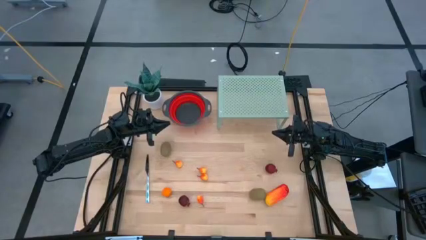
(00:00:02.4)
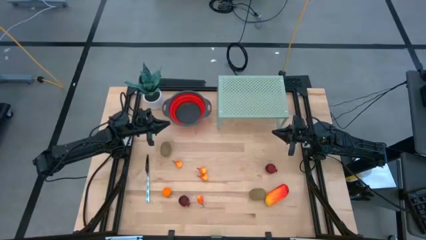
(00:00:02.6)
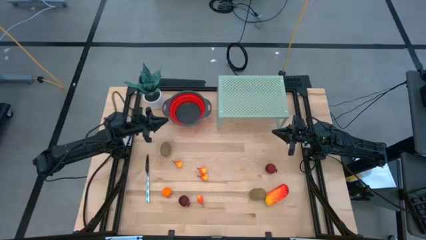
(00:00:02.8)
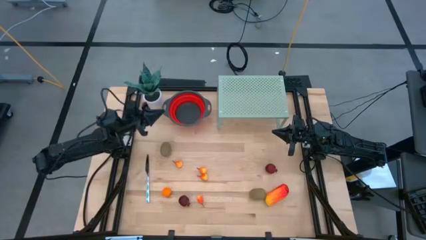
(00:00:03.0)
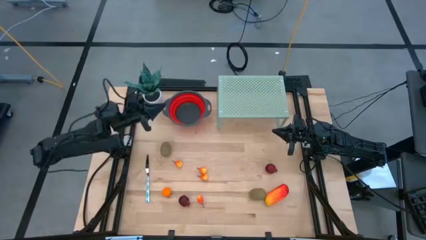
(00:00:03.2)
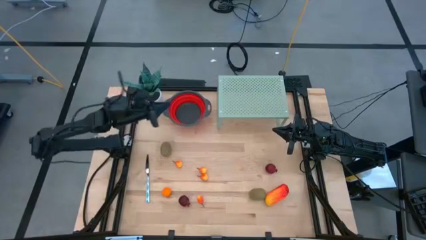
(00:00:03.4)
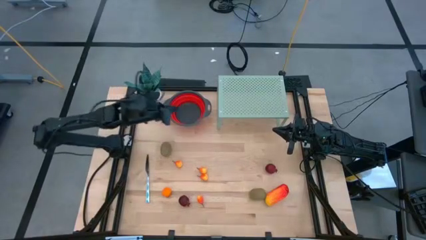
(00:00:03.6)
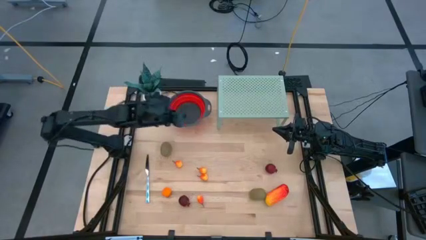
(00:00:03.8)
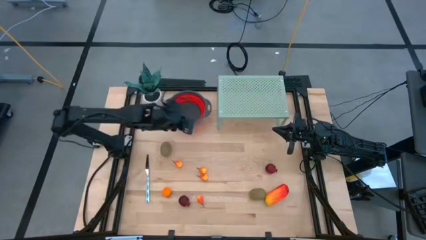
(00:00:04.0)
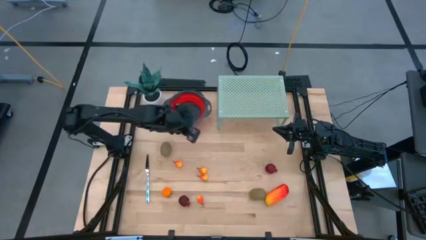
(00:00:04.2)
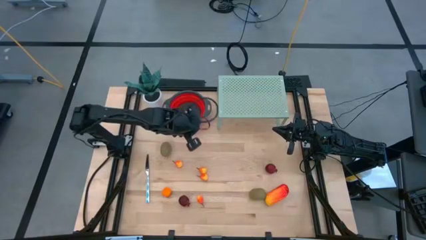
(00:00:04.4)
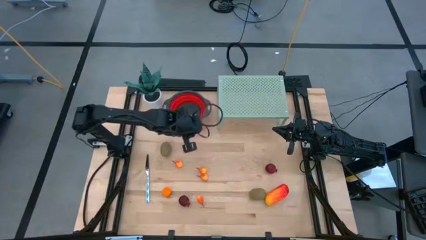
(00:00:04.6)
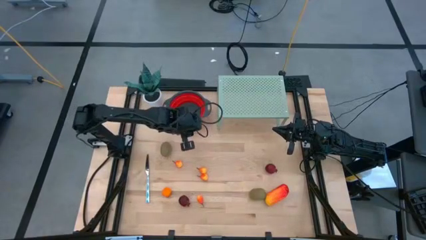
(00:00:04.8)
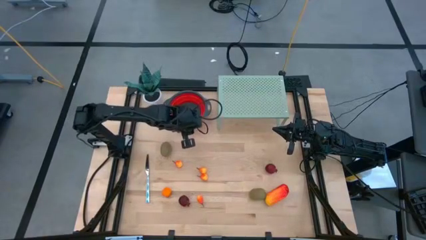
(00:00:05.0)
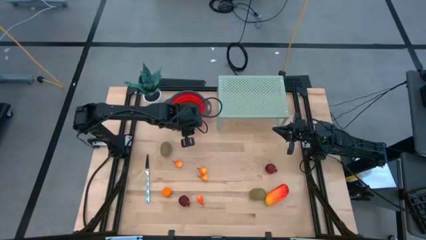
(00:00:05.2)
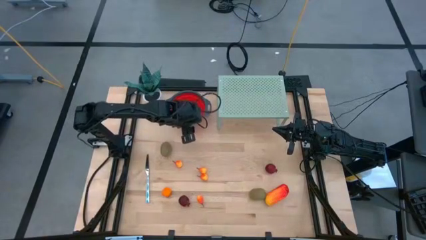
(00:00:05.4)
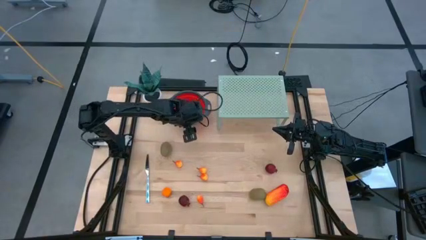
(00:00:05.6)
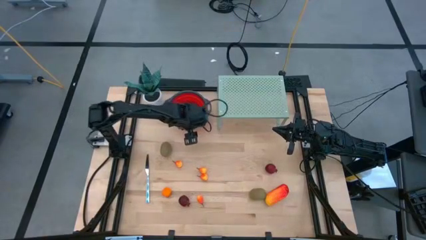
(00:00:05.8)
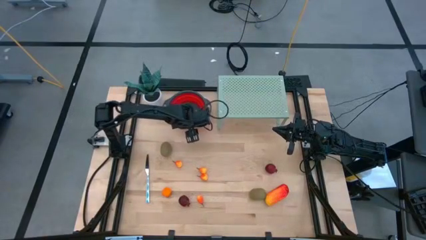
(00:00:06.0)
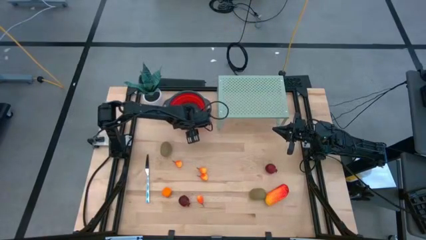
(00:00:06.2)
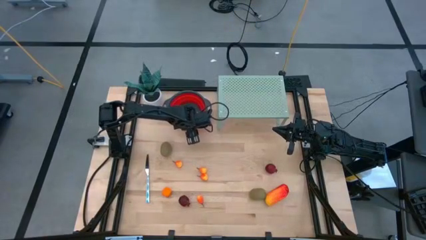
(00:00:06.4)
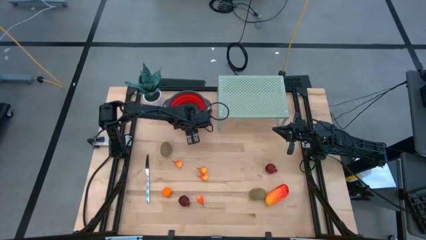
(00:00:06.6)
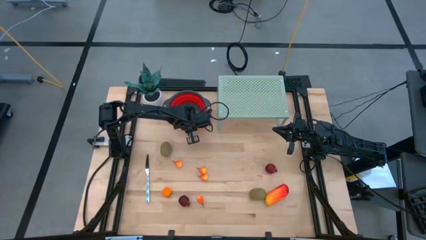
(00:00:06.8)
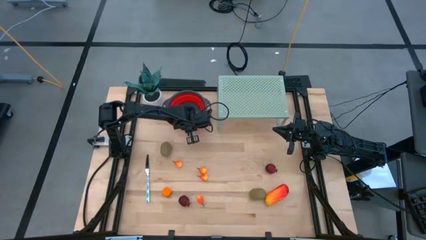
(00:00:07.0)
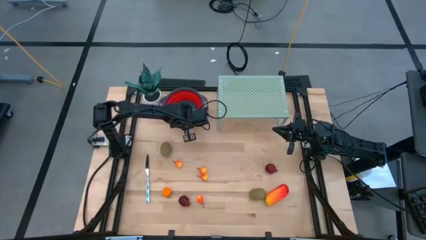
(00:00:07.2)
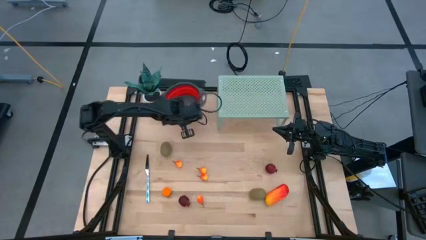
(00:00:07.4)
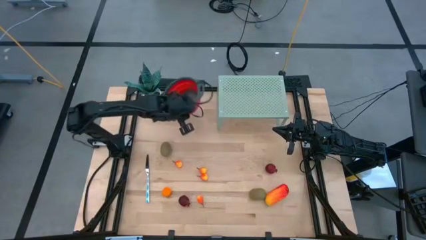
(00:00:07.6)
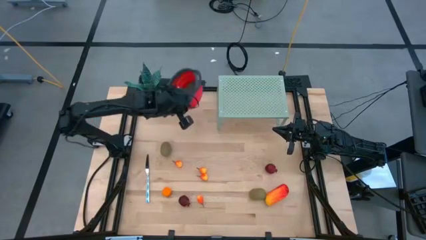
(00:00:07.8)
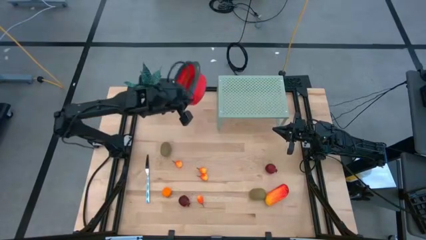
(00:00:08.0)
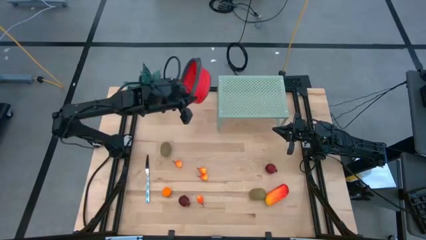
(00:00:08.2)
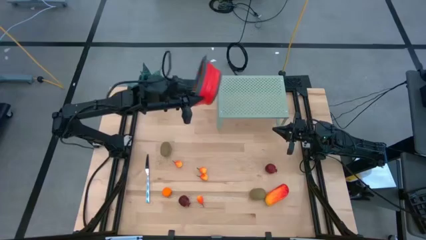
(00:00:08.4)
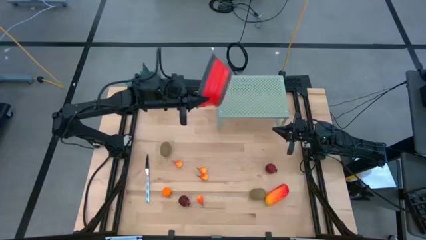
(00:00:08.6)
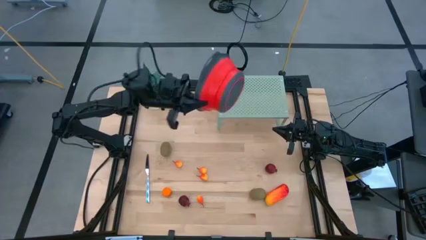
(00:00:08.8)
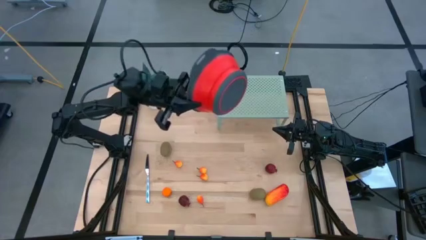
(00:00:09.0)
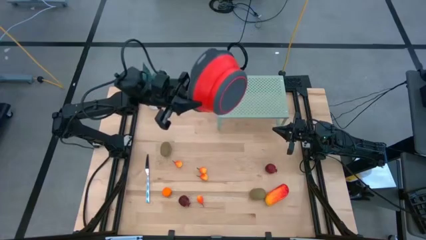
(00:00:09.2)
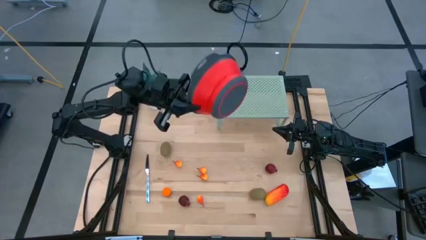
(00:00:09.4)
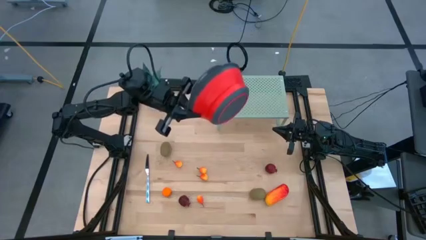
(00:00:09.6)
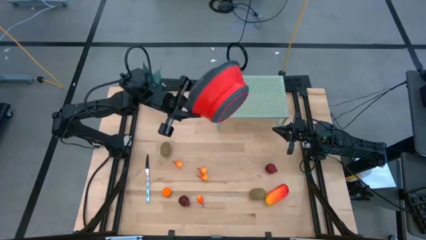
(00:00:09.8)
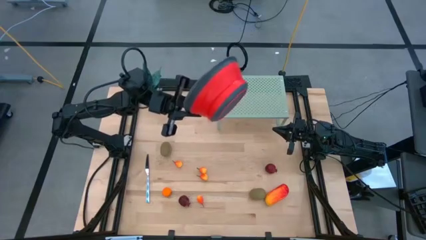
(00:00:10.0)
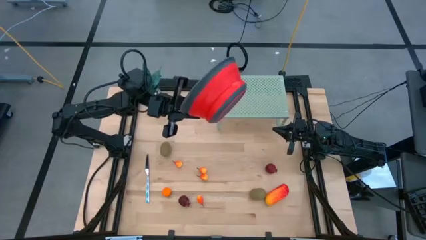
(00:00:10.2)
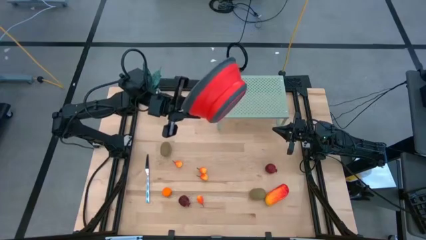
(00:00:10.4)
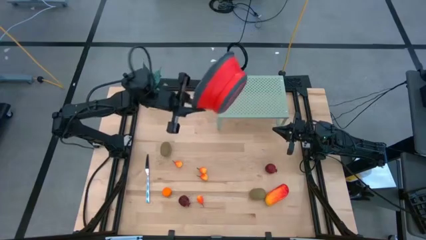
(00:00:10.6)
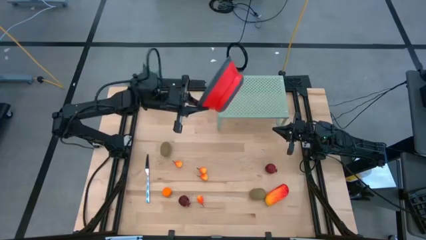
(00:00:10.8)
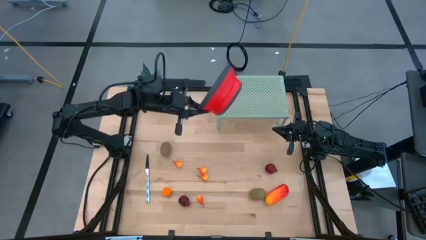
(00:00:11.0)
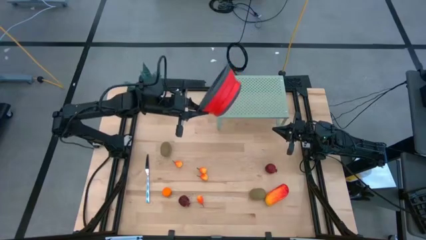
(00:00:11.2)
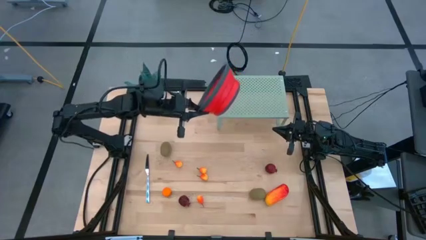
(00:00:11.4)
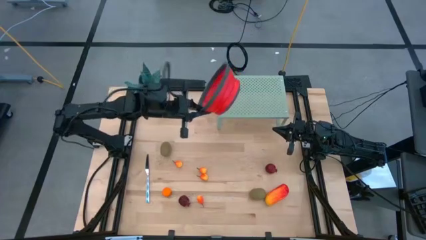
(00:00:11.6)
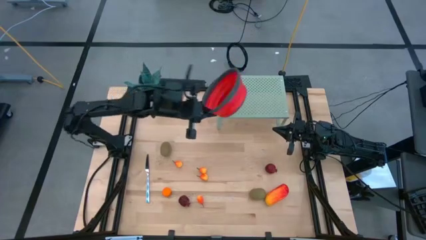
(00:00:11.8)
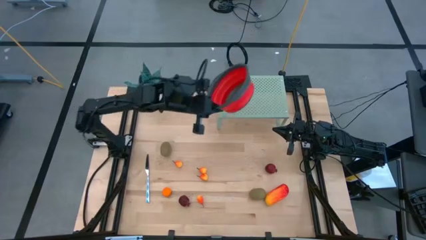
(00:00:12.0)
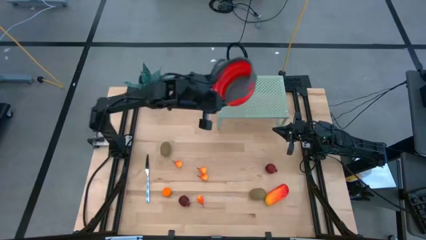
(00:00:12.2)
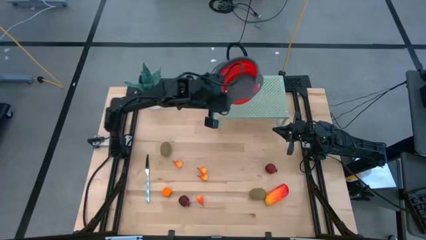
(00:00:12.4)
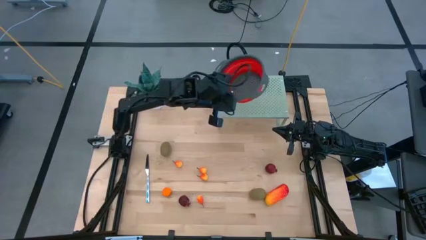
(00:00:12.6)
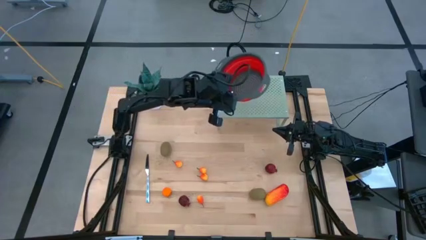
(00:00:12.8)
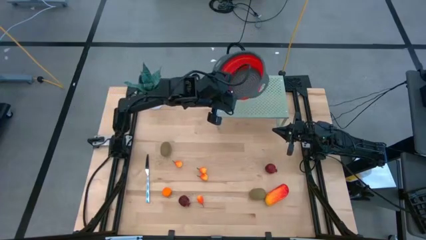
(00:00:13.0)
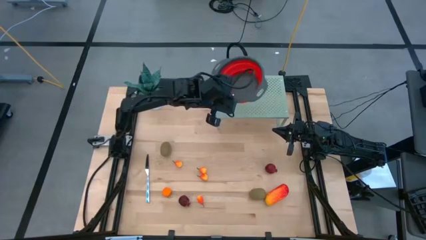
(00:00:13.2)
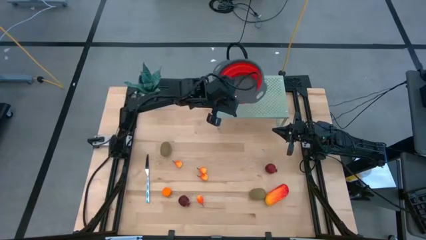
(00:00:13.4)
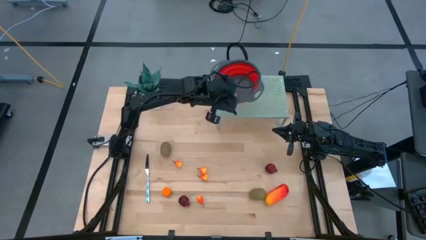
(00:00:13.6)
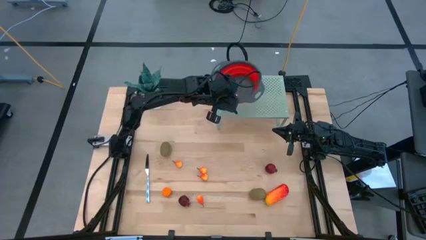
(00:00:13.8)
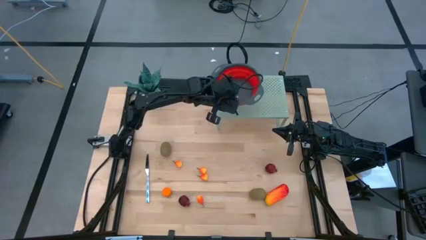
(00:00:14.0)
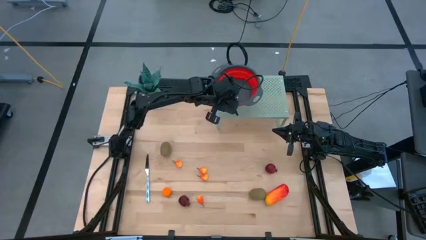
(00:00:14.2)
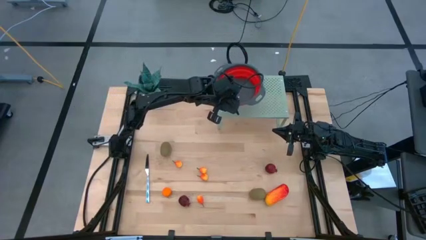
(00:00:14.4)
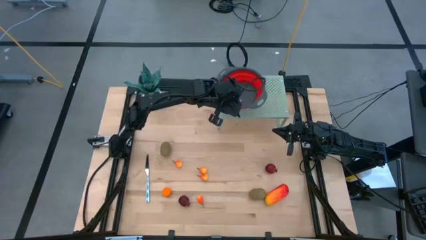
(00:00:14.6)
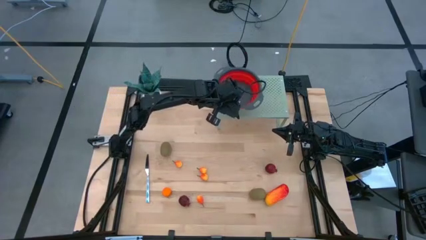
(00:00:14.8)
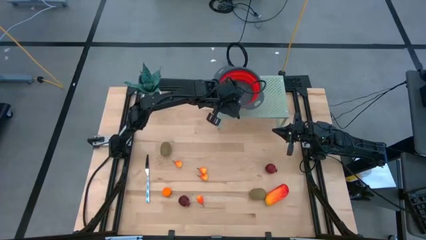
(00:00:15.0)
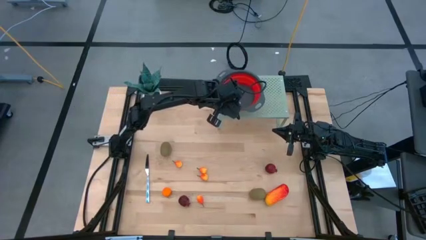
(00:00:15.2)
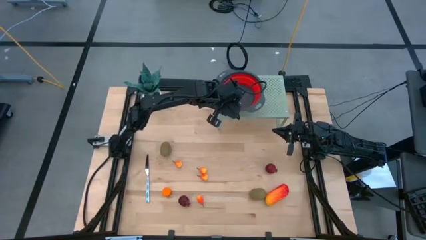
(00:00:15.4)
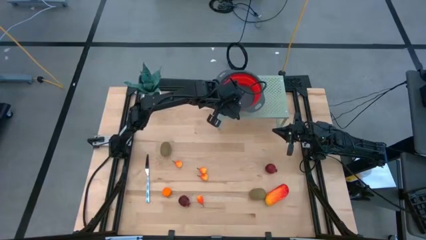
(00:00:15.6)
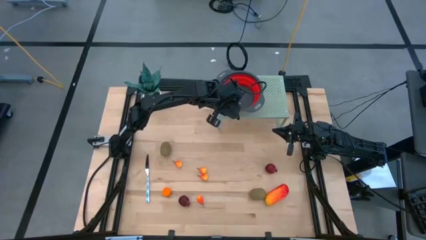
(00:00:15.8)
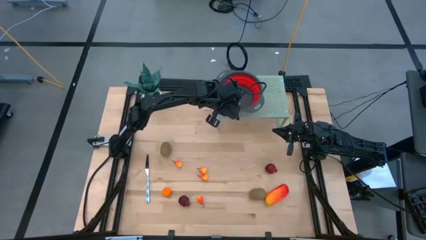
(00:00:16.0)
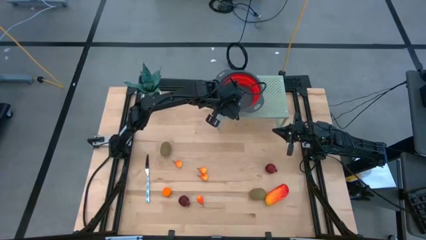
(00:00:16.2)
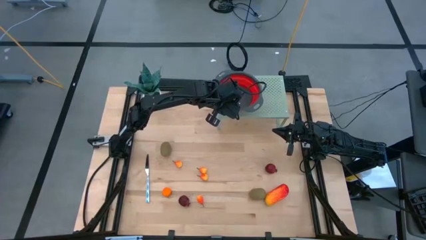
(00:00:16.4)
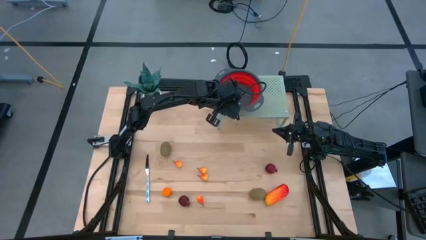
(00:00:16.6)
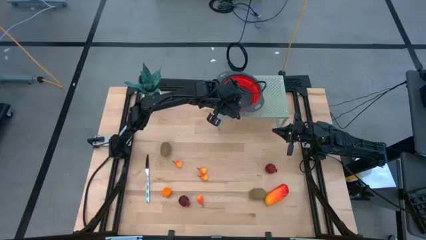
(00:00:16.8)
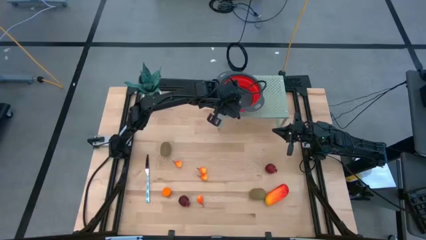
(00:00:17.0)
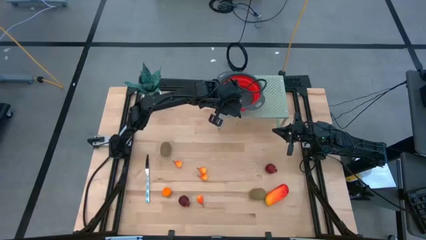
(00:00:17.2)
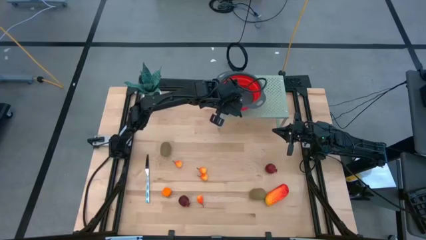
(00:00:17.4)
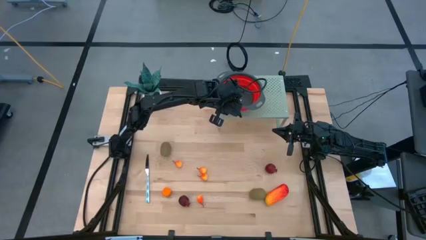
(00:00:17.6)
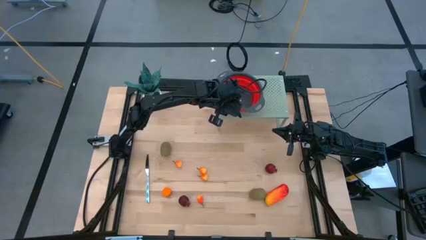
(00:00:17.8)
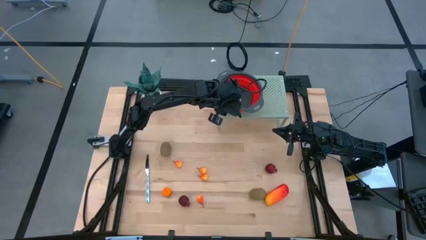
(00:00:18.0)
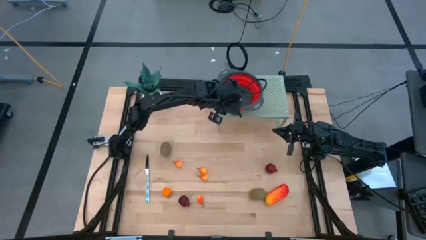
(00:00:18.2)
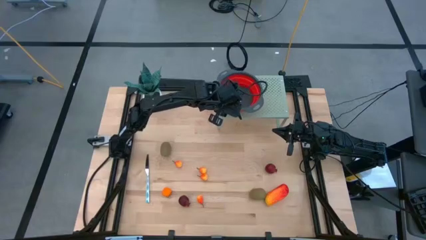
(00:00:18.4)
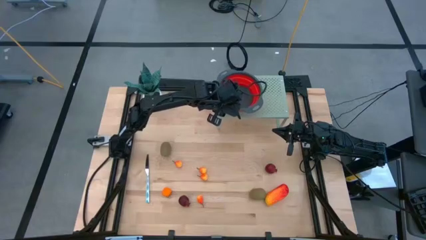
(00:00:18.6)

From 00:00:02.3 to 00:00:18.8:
Task: Pick & Place Fruit
Put the red strainer bowl on the shelf
